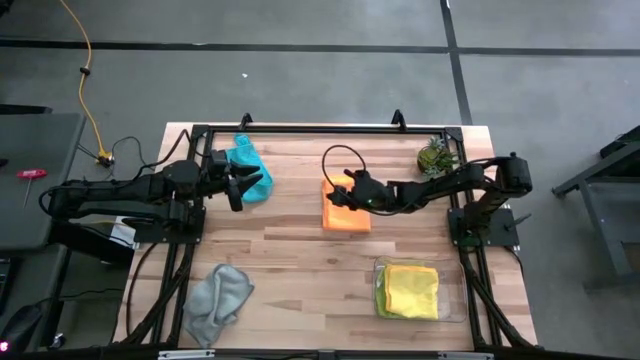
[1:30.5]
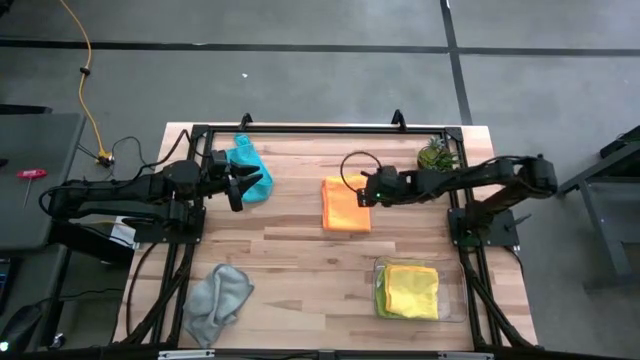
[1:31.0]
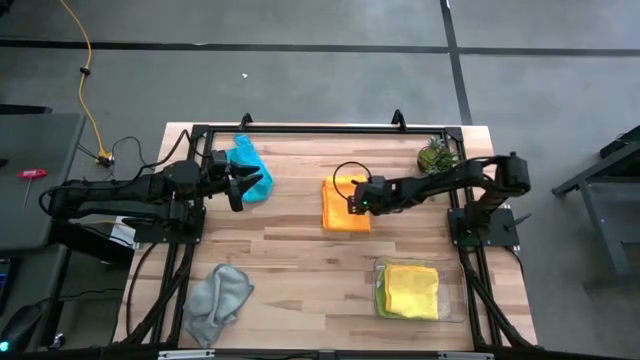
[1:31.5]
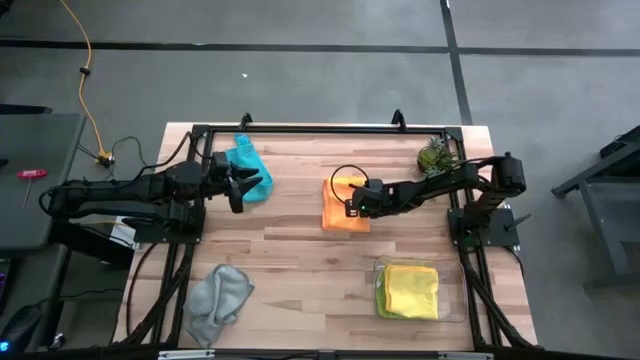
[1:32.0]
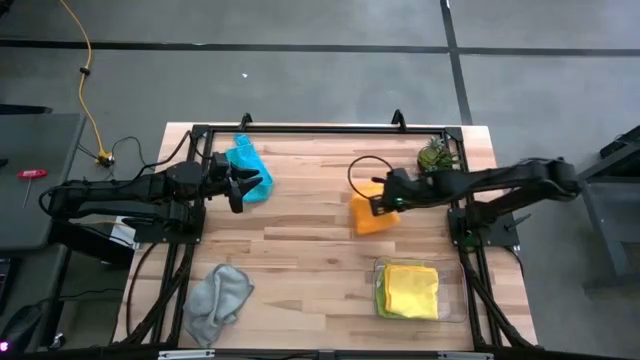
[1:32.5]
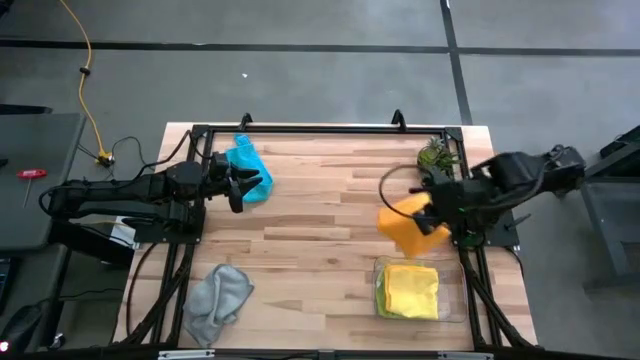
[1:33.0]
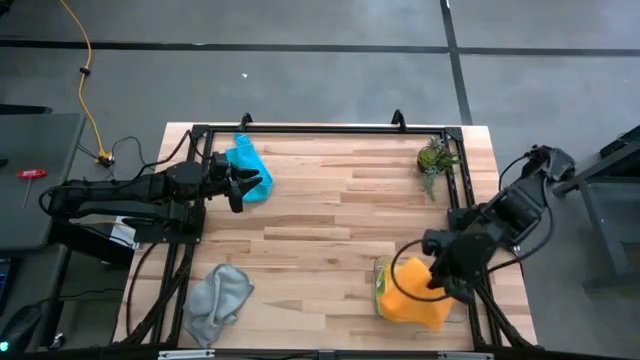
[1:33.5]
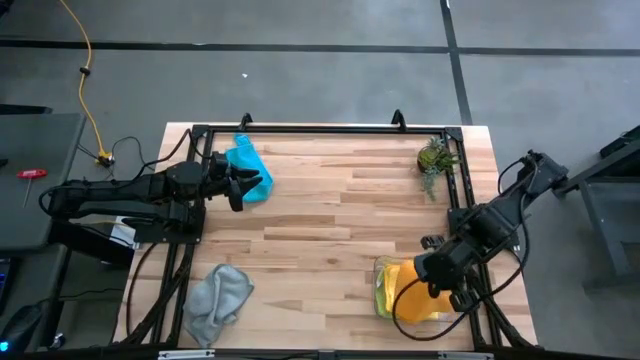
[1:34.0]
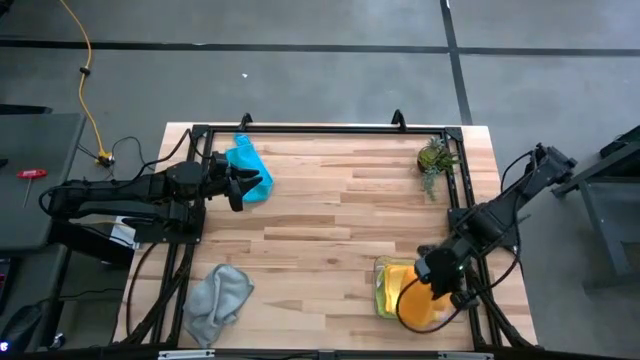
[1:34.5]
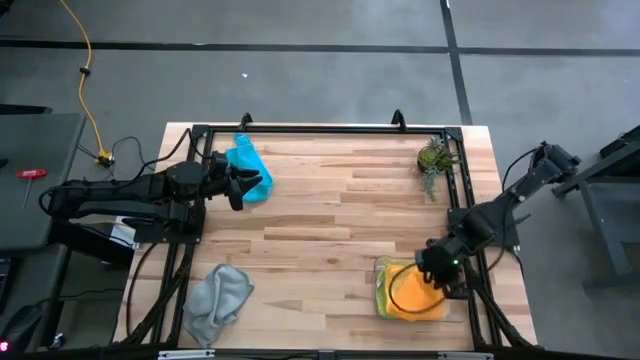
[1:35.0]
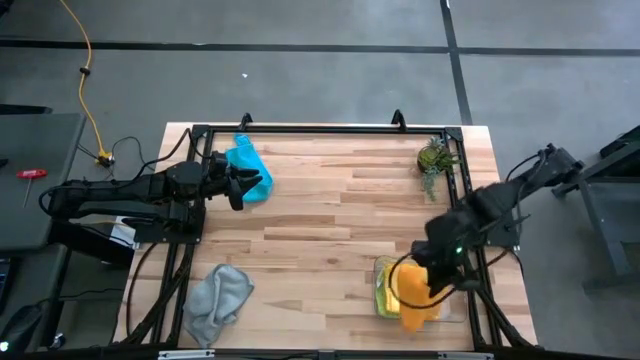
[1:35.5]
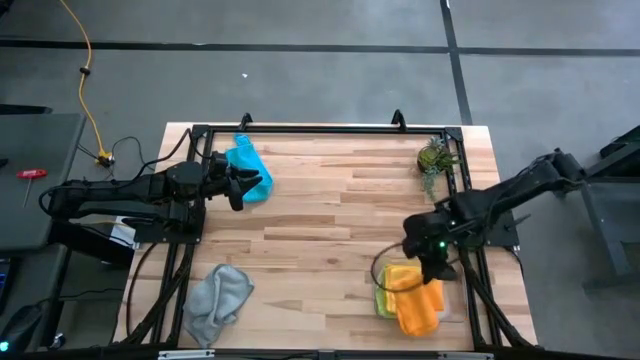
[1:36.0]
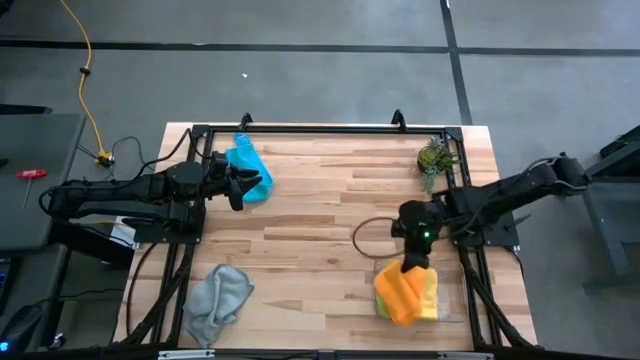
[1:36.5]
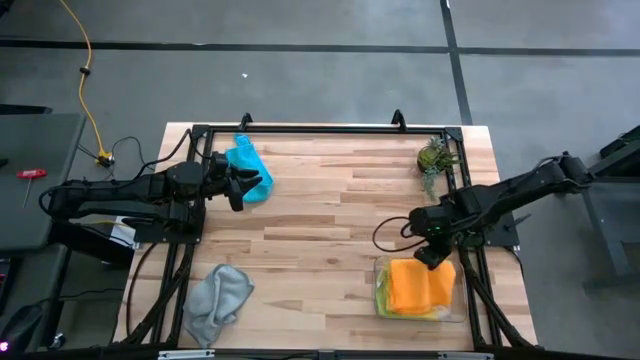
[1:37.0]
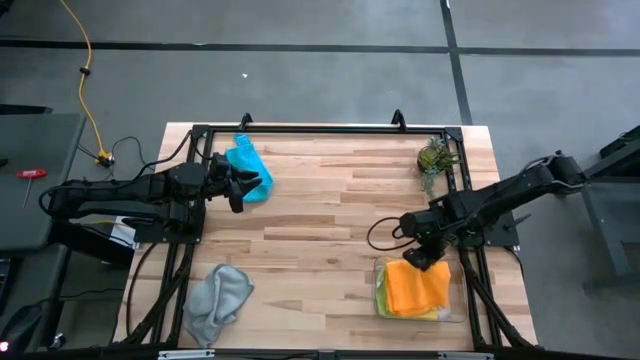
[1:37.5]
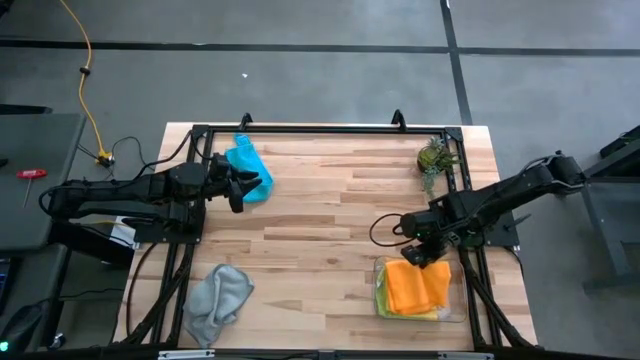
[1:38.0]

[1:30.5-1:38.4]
Task: Fold microfiber towels
Put the orange microfiber cloth into the transparent bin

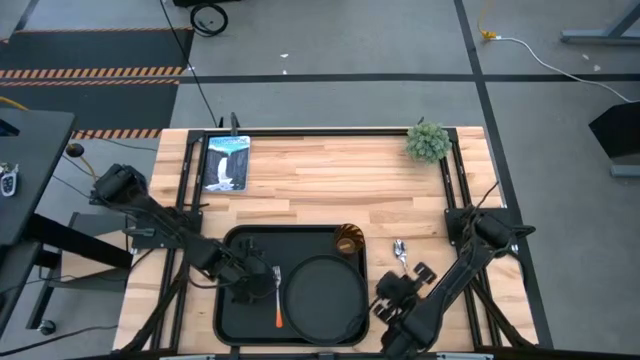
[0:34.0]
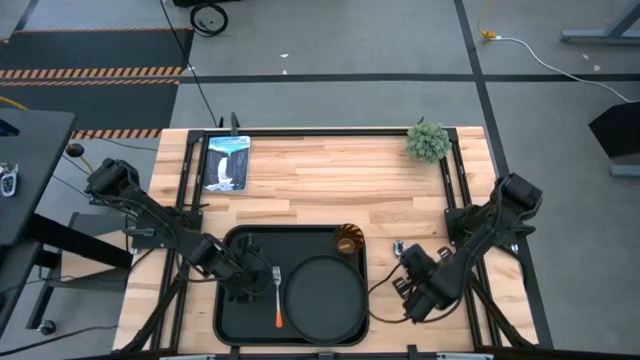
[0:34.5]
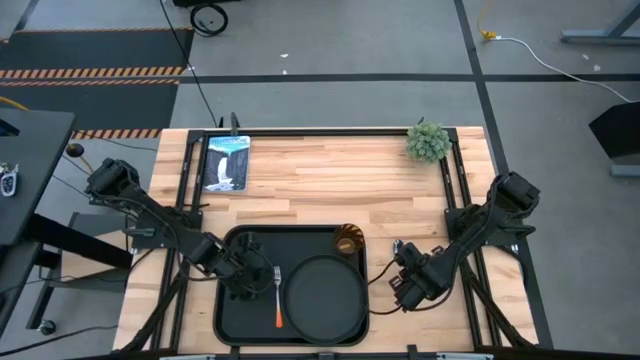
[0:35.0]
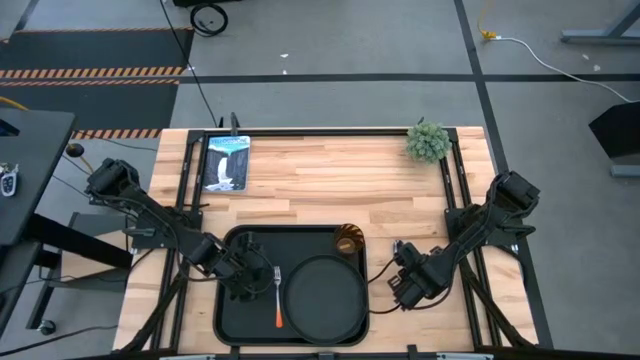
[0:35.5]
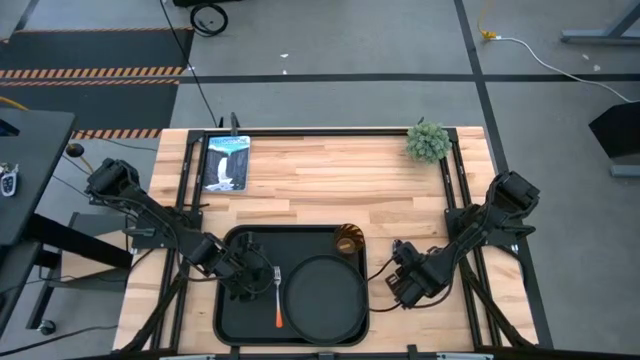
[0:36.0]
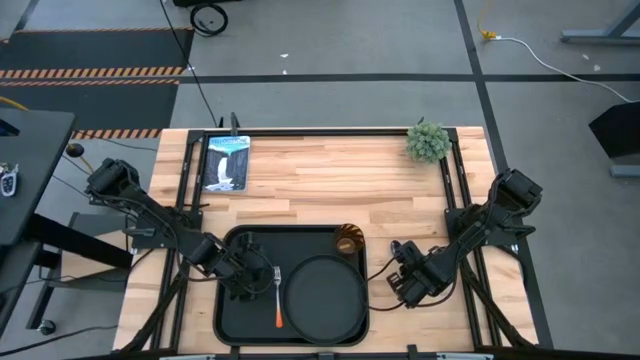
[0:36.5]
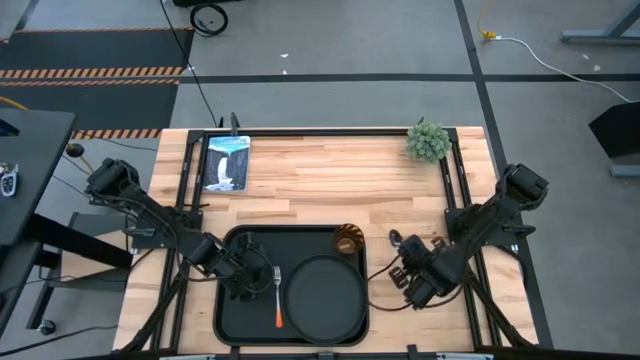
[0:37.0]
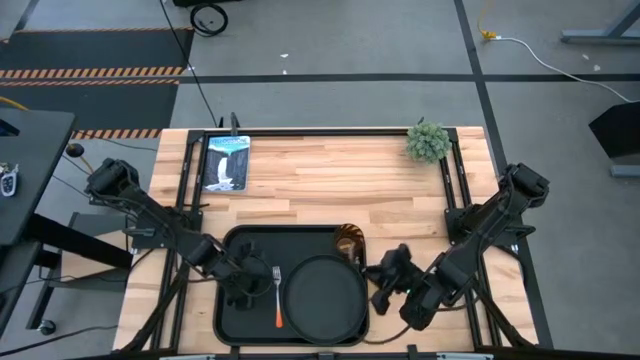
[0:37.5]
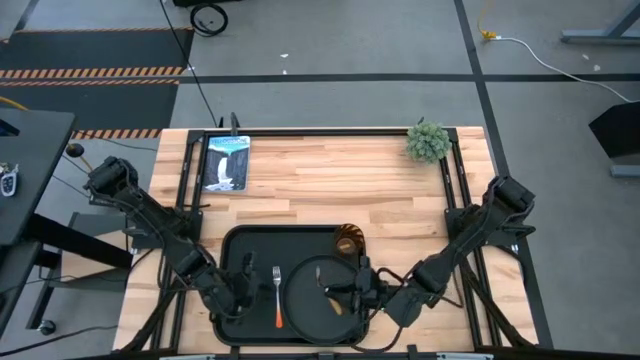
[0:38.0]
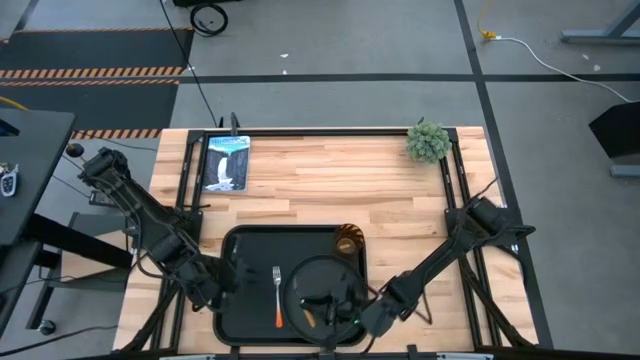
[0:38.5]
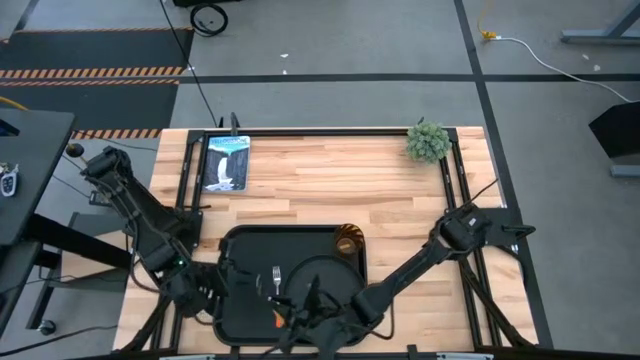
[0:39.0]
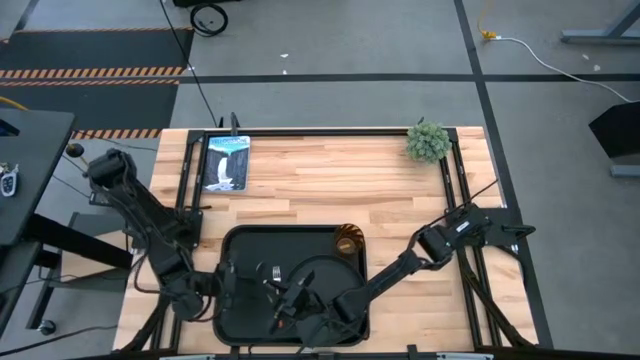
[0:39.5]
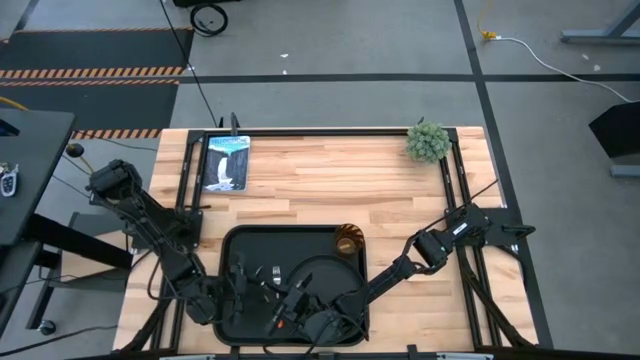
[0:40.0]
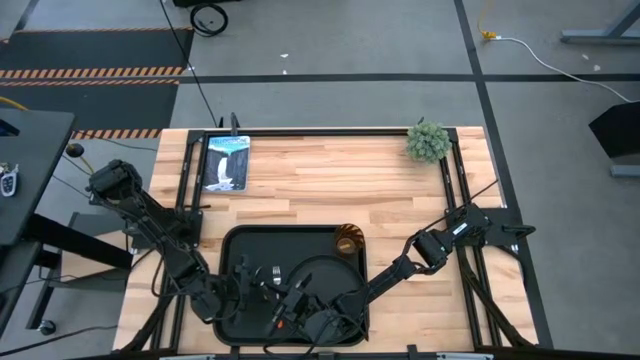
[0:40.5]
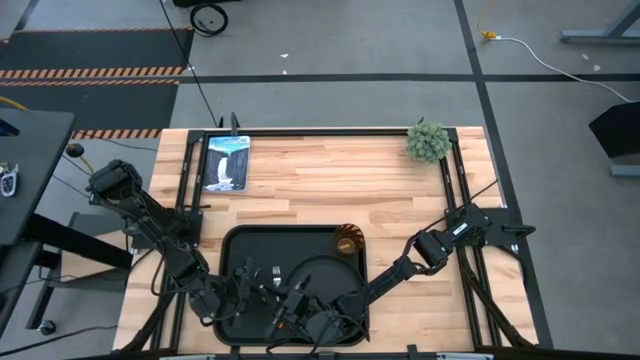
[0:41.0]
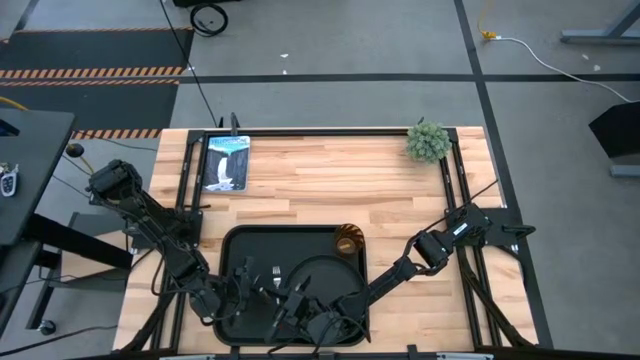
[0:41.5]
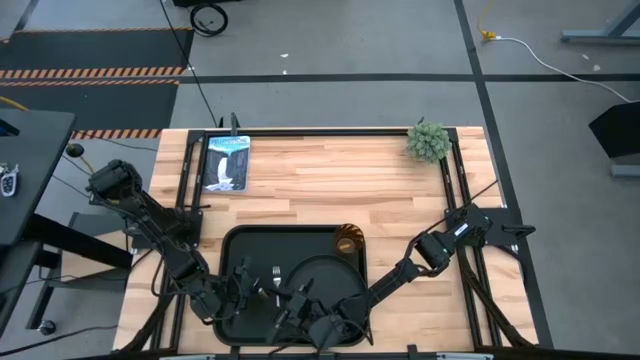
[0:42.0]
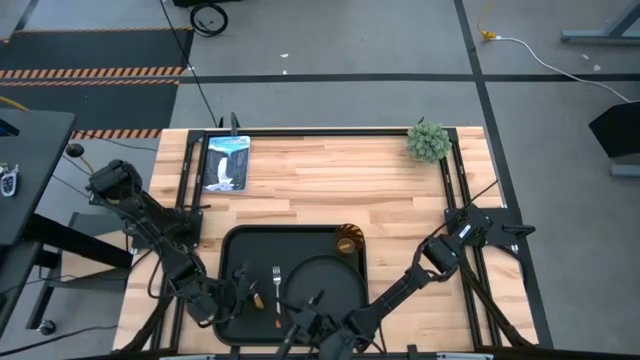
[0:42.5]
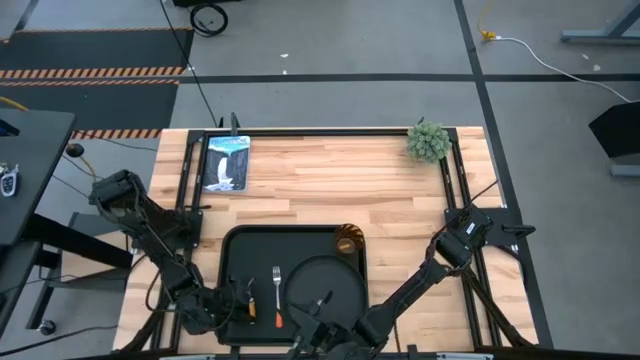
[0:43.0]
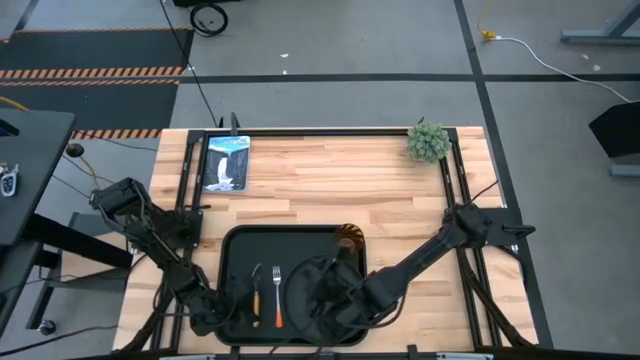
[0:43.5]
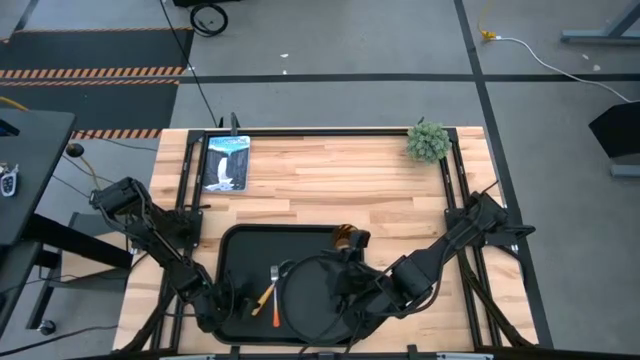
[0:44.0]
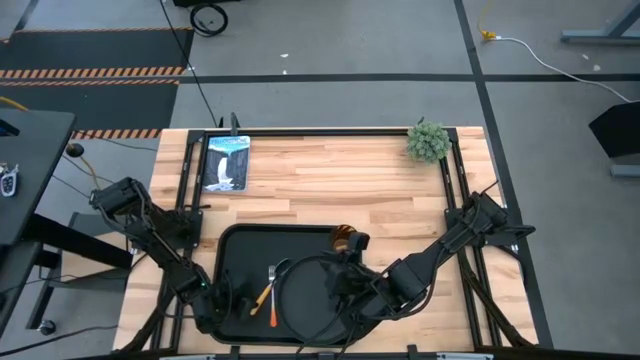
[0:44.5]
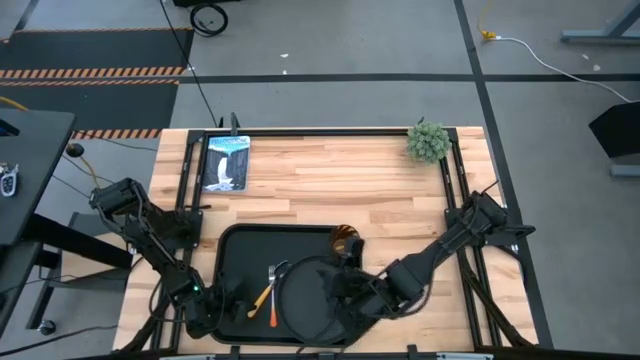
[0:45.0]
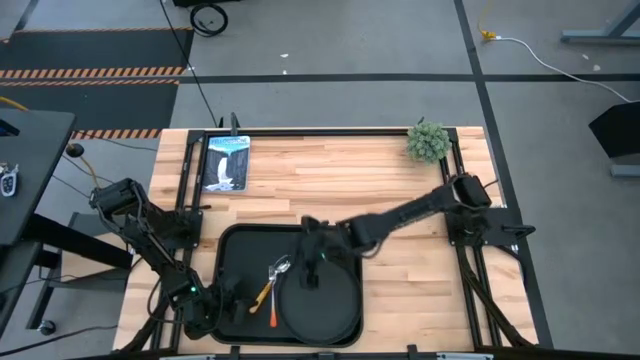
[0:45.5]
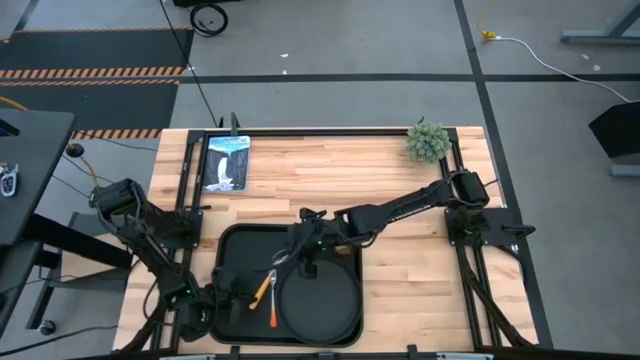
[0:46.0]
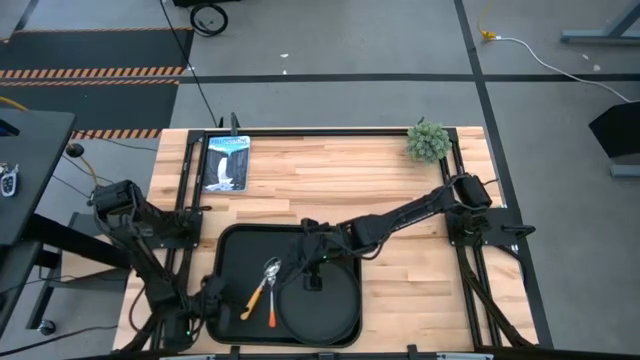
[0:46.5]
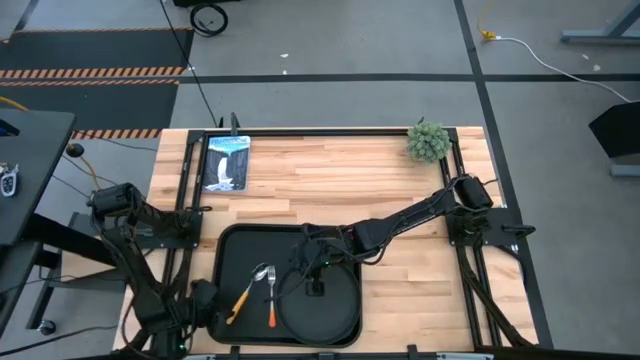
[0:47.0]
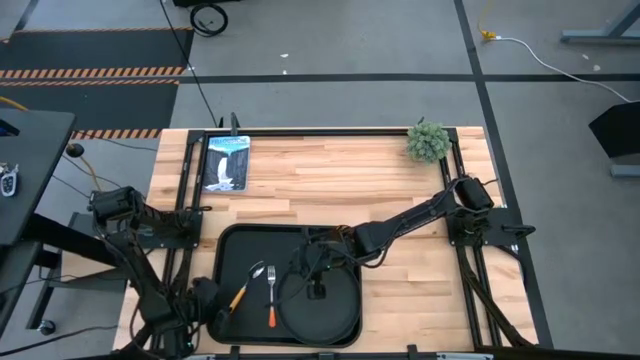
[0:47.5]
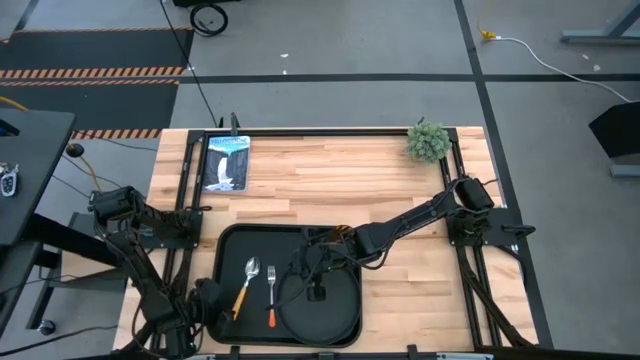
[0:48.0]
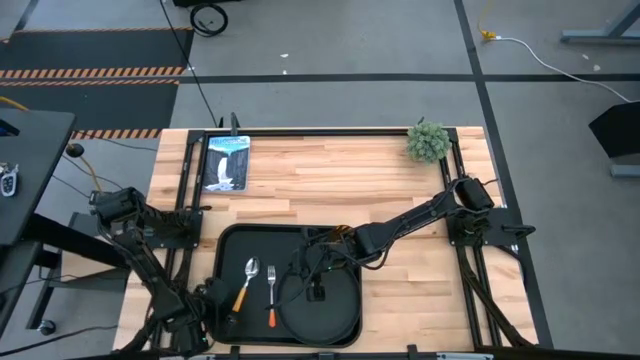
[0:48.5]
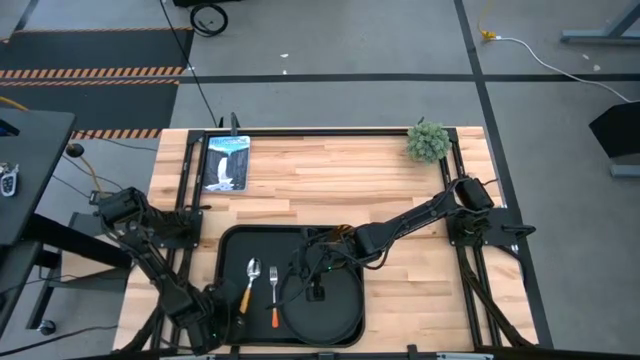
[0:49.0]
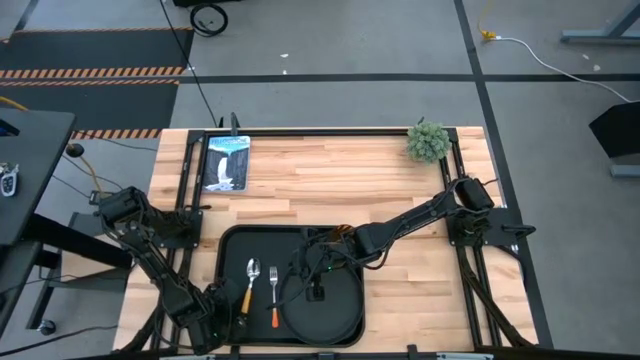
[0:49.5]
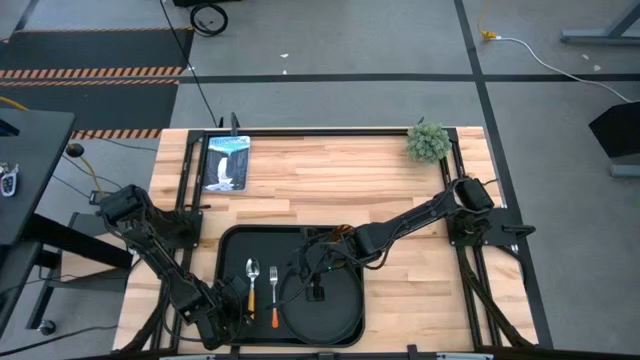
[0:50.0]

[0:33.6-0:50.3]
Task: Pick and place plate/cup/fork/spoon on tray
Put the yellow spoon on the left side of the black tray
